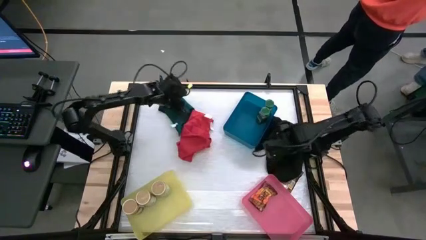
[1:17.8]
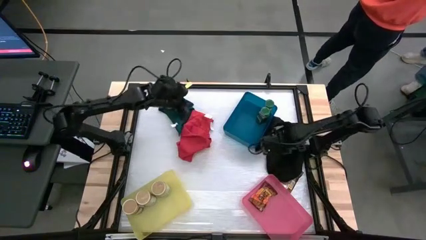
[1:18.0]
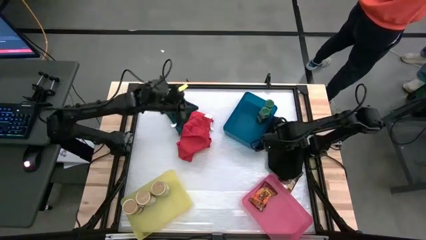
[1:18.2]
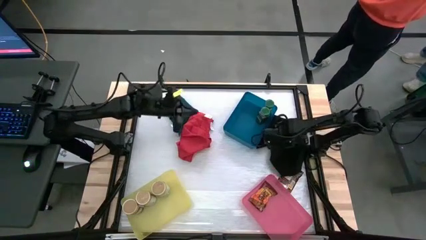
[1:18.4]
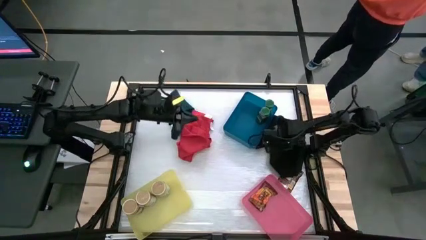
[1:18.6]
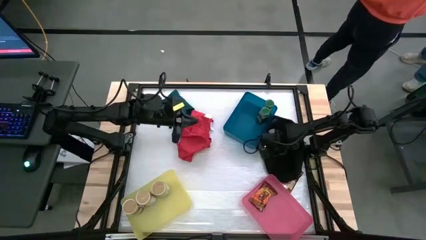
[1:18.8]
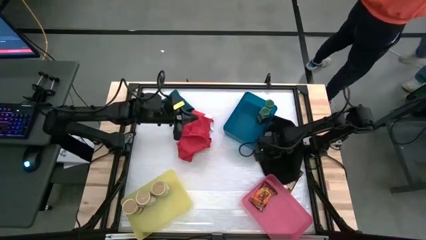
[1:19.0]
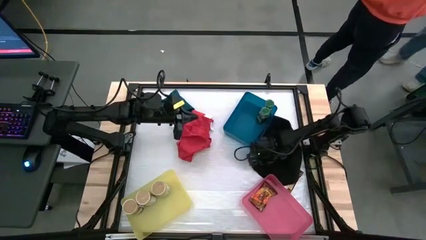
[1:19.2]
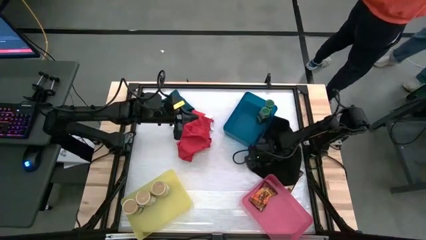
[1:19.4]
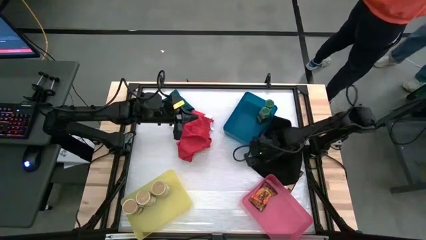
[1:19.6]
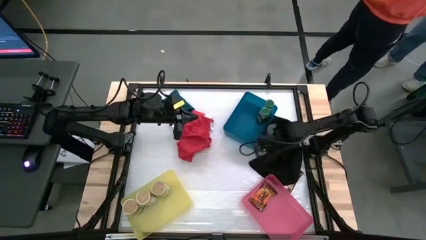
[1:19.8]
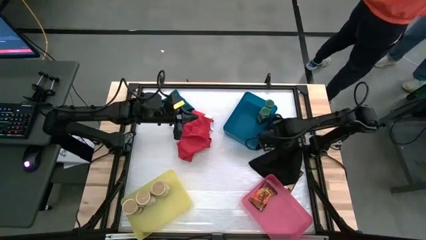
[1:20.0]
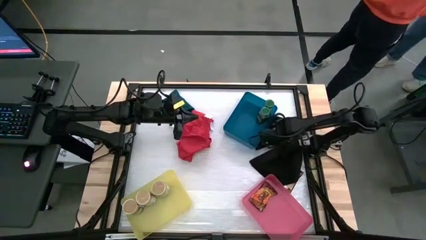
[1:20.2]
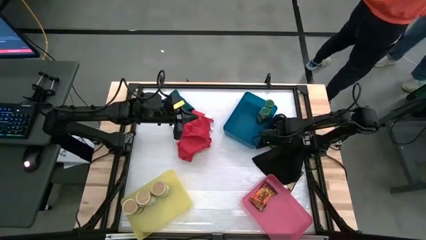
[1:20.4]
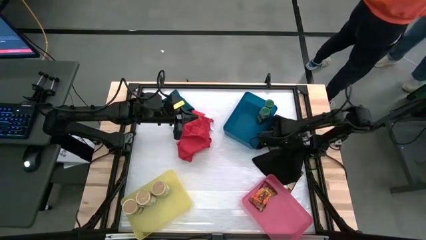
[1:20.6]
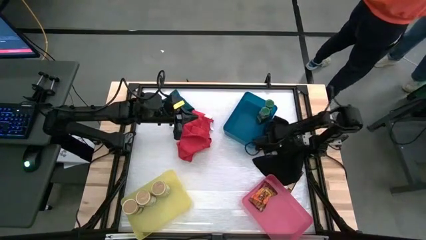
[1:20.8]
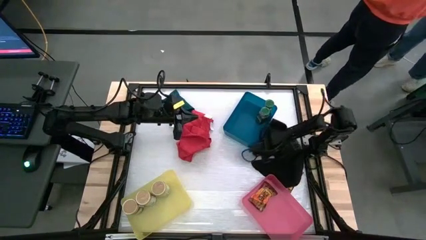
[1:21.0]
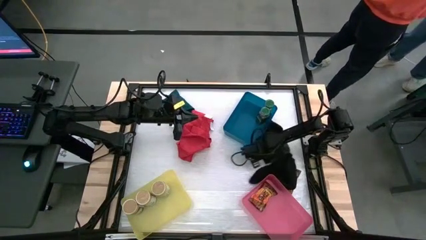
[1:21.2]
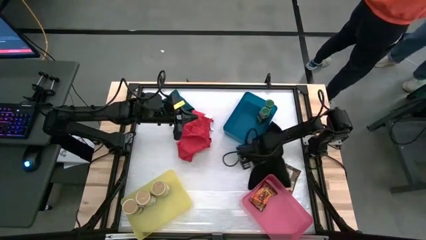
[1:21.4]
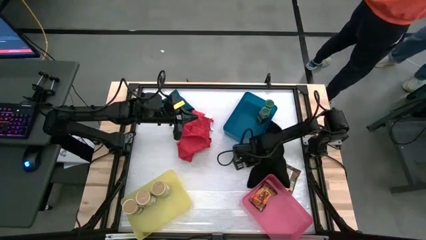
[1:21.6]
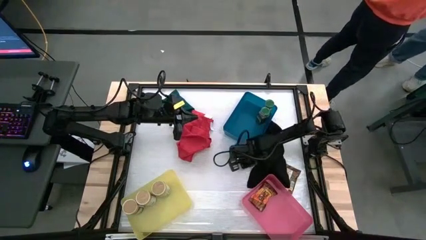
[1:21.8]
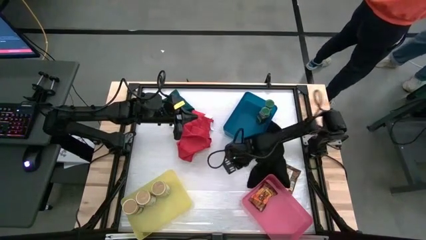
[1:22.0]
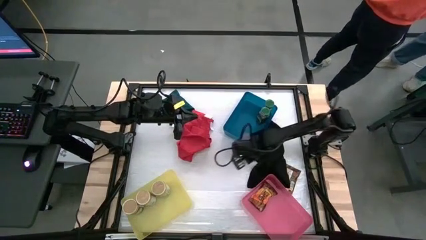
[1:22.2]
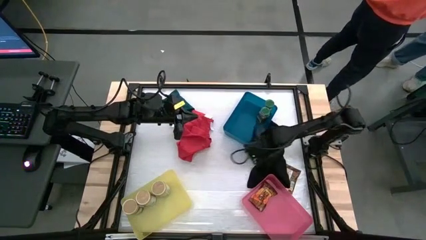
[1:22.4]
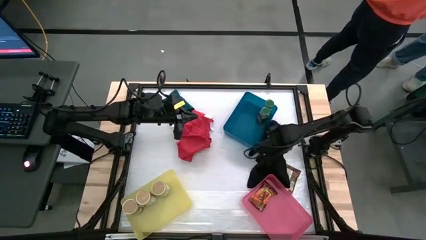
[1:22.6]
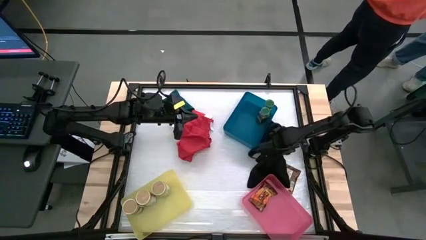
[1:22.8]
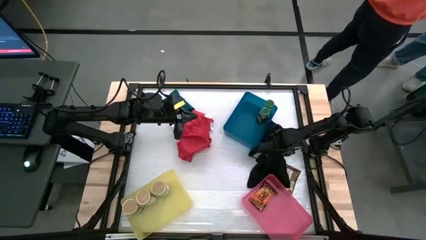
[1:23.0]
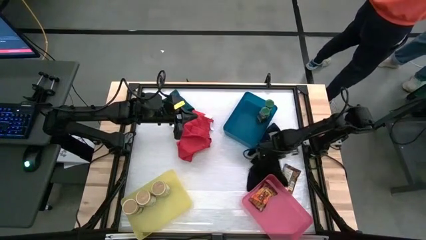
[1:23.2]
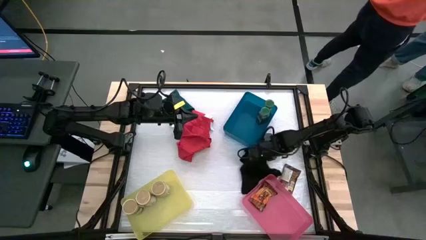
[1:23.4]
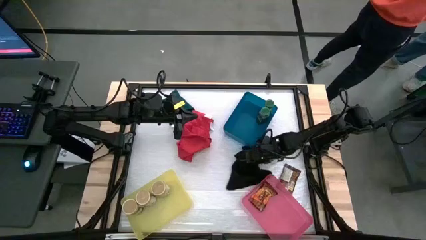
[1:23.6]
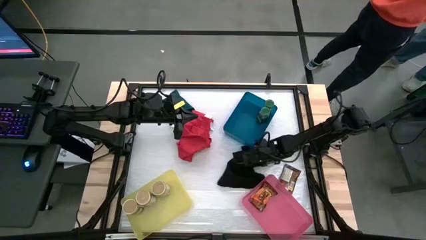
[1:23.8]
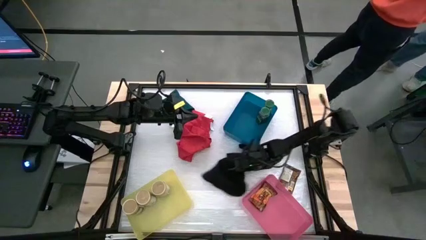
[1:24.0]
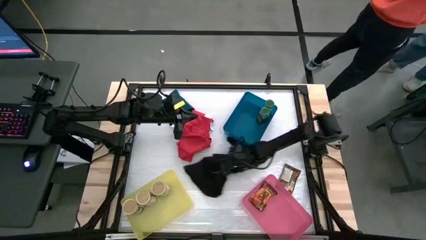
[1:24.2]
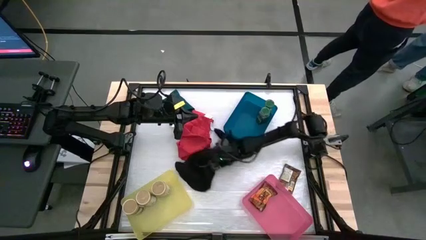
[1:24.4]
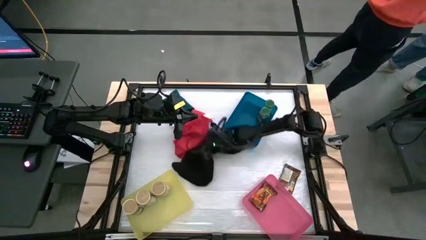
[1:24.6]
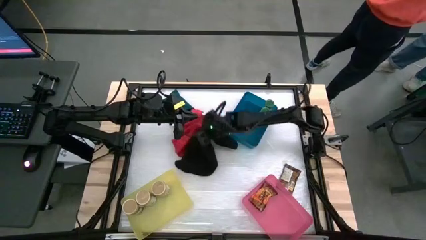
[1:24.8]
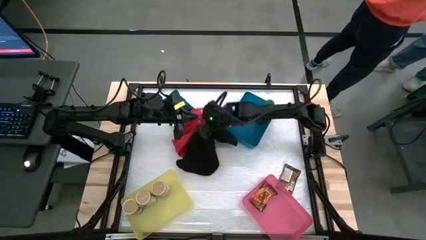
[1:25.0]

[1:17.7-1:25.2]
Task: Sort spices by type
Move the black towel to the center left of the table

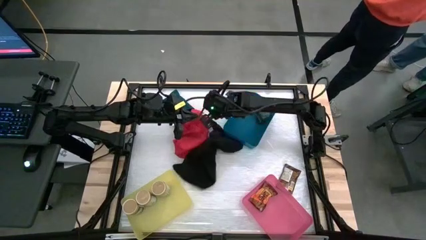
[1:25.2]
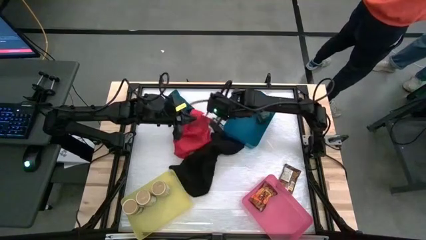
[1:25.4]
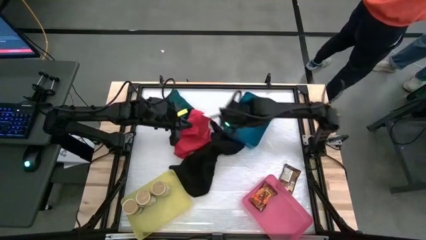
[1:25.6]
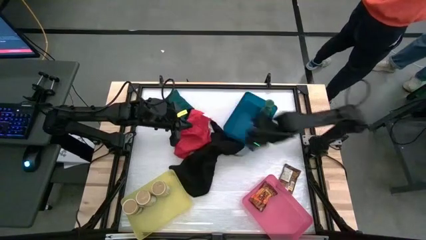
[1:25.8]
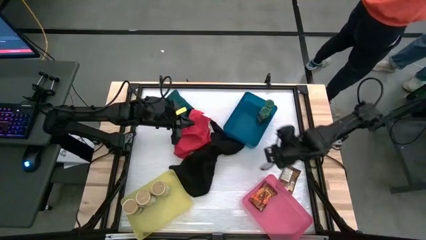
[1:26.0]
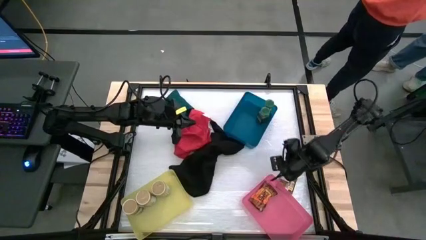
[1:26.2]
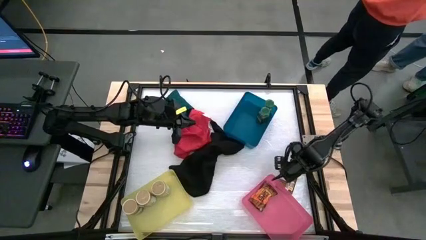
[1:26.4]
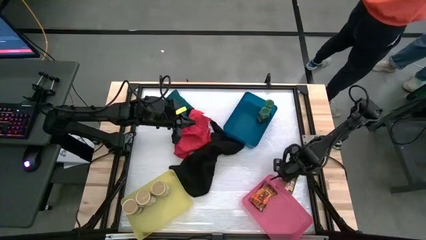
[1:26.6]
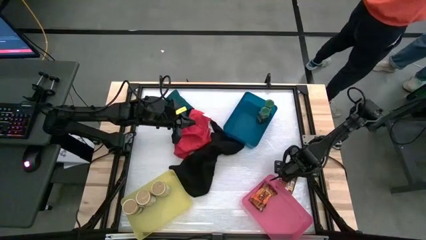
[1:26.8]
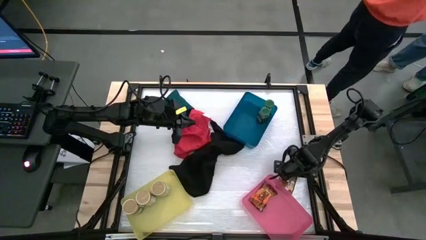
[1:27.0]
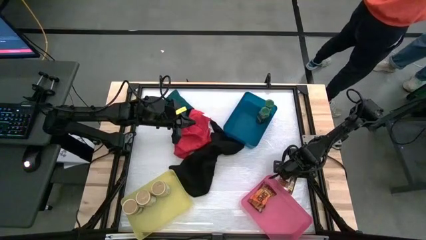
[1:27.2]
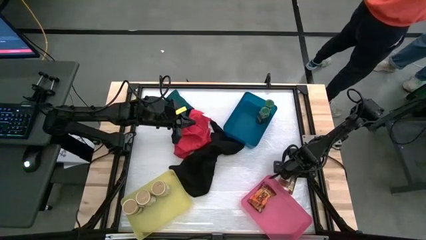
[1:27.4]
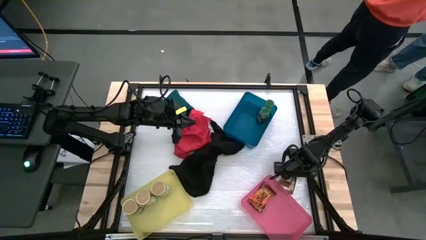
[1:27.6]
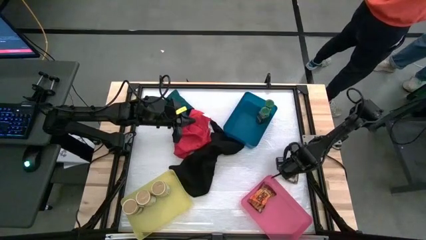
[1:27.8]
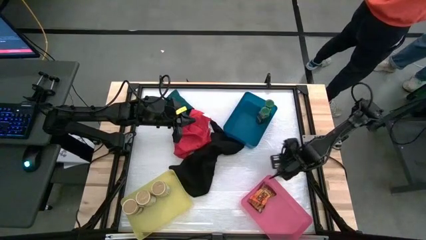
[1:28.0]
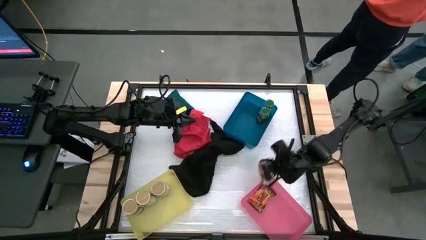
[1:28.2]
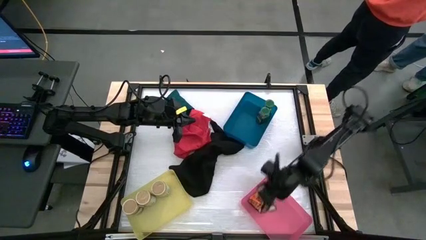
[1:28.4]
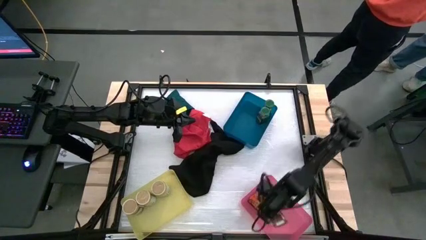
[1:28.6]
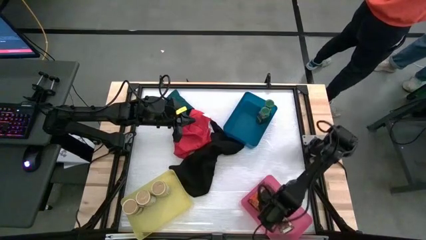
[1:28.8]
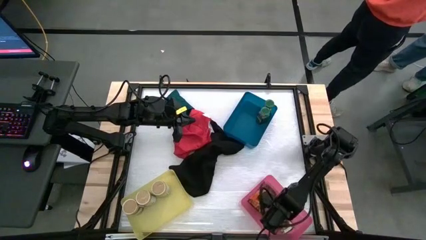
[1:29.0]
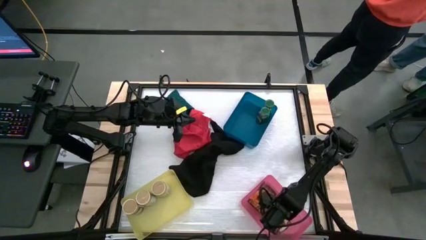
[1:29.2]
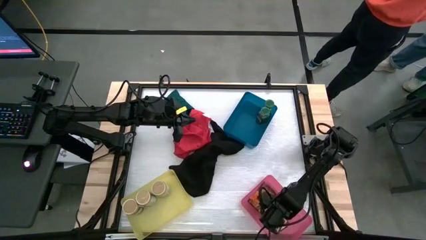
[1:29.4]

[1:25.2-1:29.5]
Put the orange seasoning bag into the pink bin
